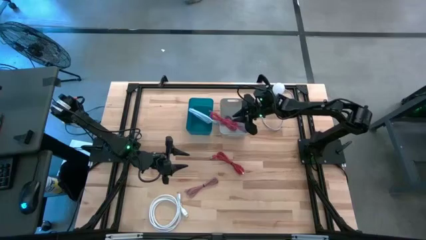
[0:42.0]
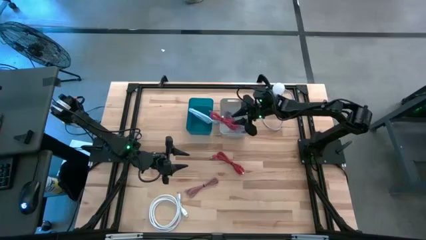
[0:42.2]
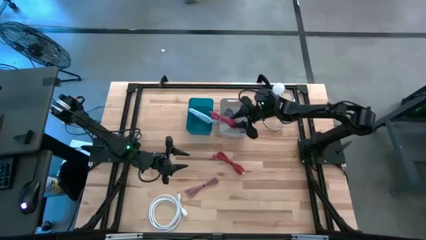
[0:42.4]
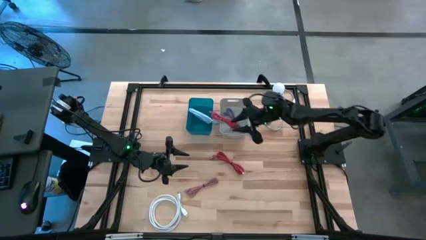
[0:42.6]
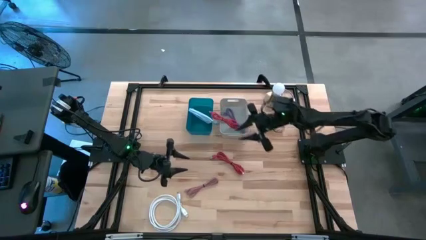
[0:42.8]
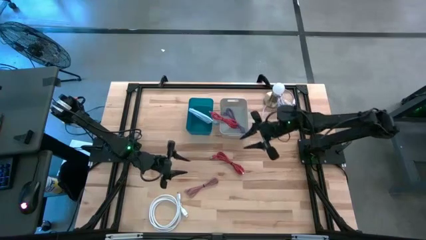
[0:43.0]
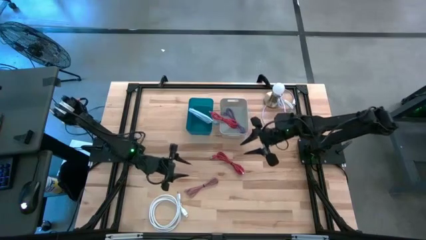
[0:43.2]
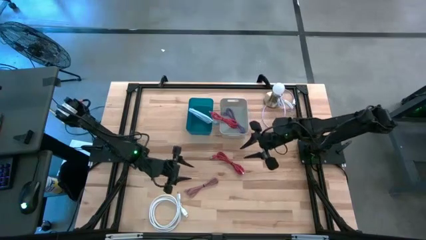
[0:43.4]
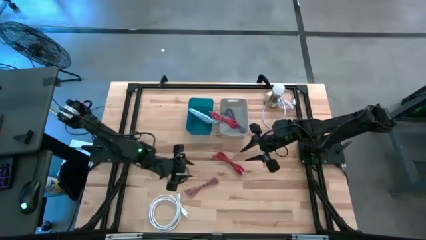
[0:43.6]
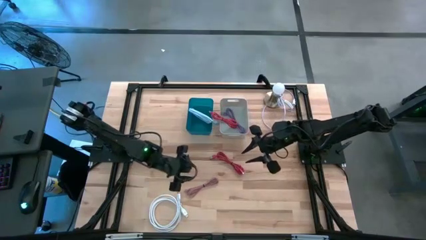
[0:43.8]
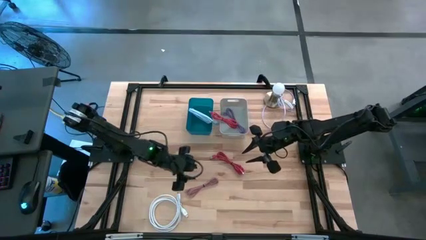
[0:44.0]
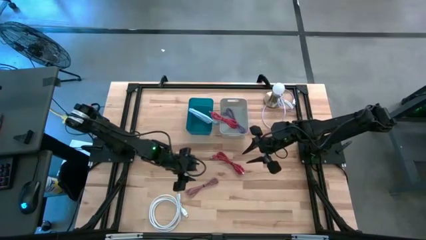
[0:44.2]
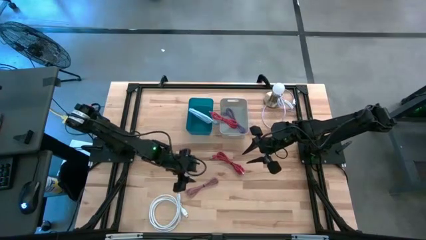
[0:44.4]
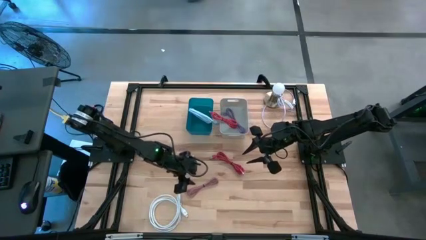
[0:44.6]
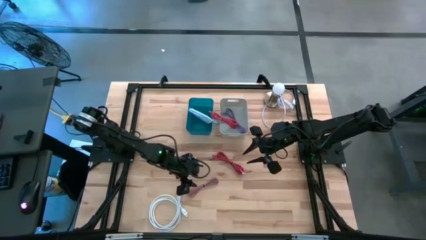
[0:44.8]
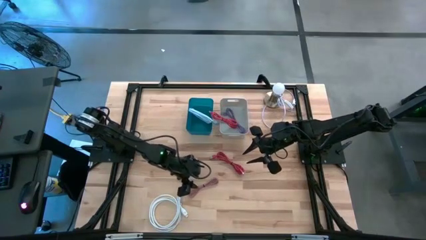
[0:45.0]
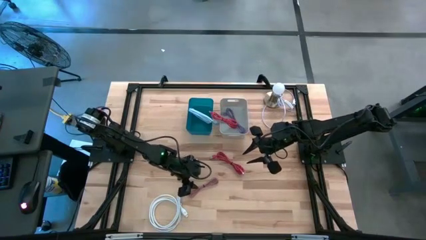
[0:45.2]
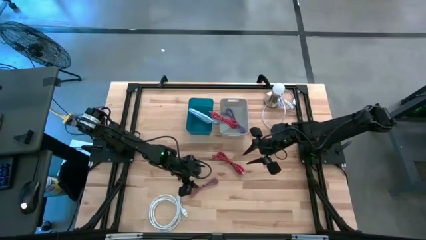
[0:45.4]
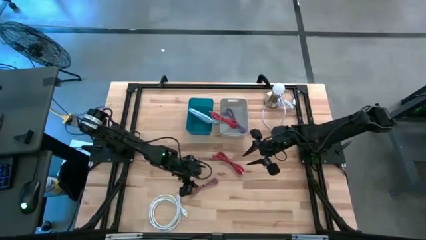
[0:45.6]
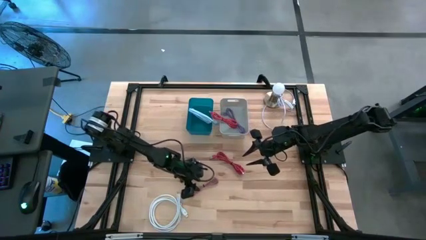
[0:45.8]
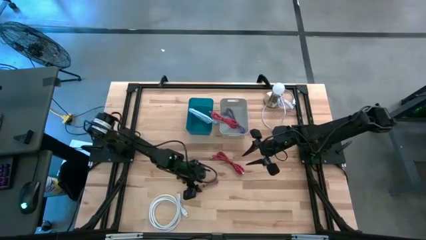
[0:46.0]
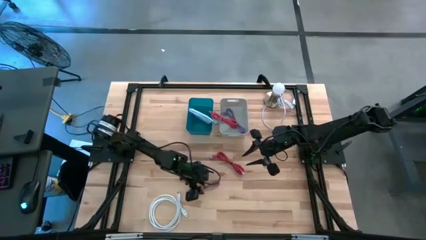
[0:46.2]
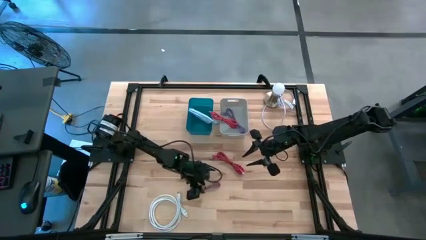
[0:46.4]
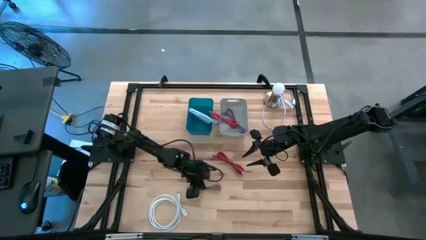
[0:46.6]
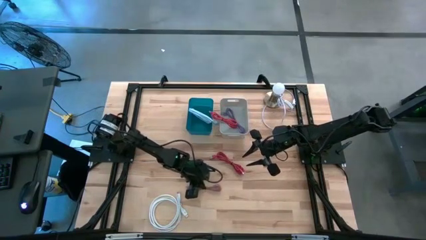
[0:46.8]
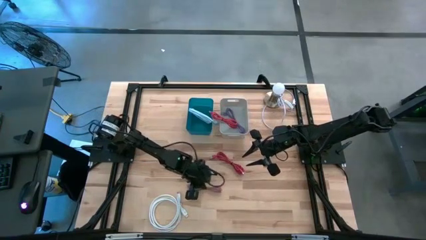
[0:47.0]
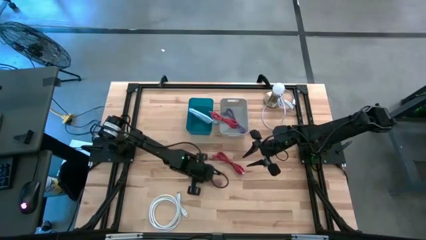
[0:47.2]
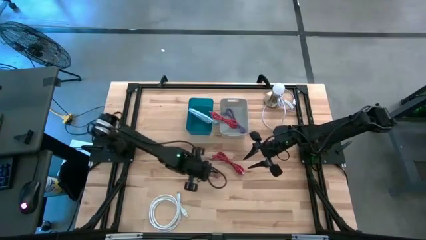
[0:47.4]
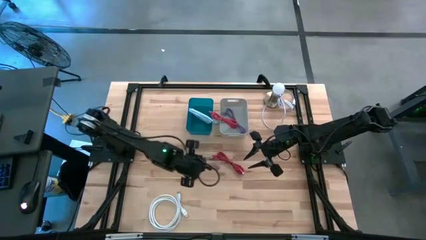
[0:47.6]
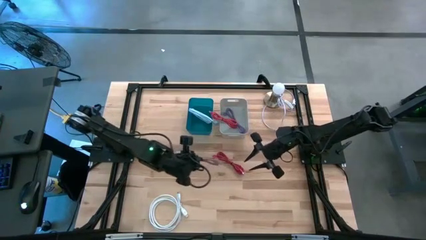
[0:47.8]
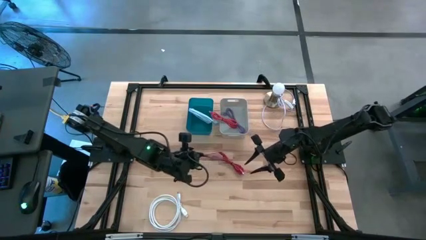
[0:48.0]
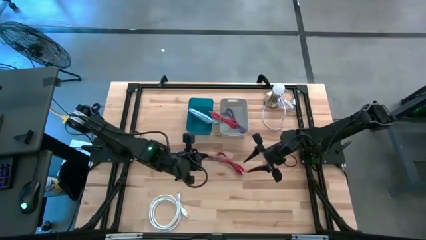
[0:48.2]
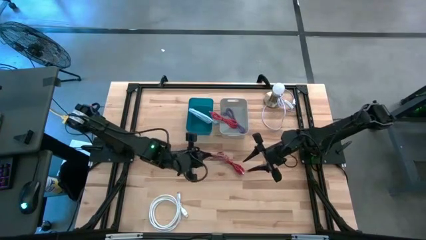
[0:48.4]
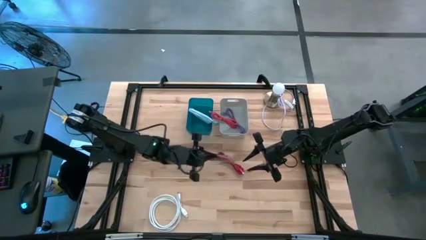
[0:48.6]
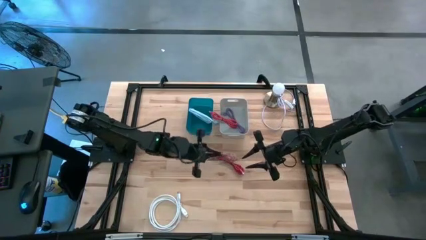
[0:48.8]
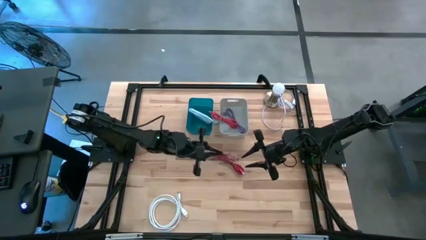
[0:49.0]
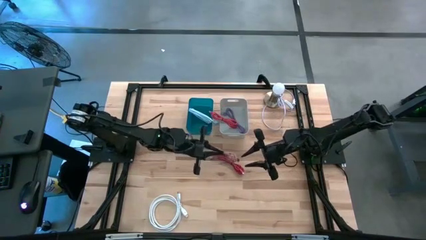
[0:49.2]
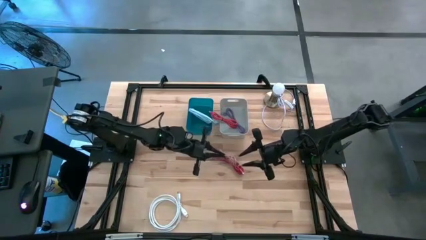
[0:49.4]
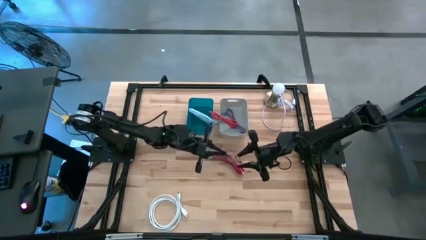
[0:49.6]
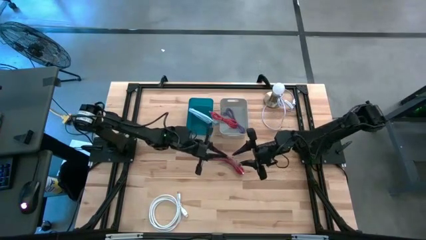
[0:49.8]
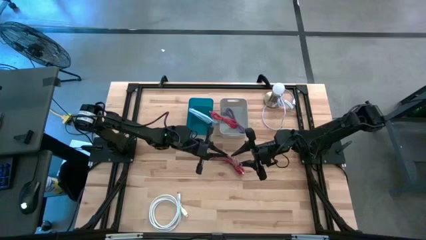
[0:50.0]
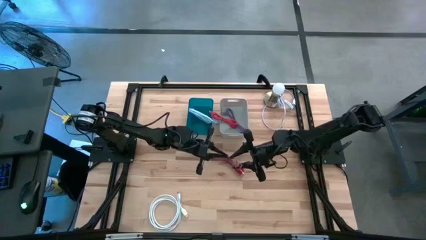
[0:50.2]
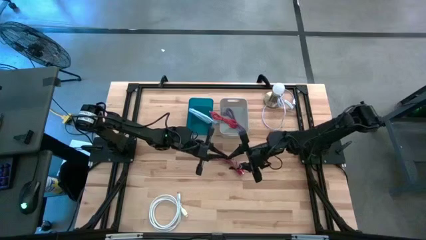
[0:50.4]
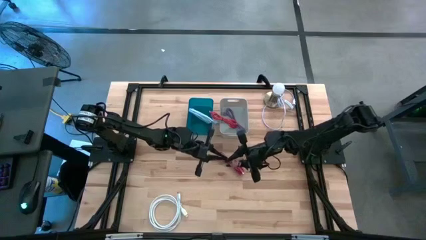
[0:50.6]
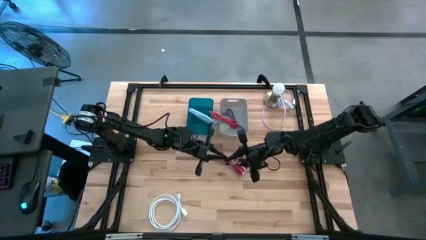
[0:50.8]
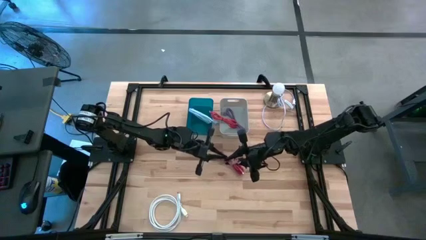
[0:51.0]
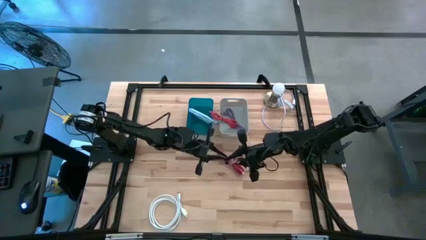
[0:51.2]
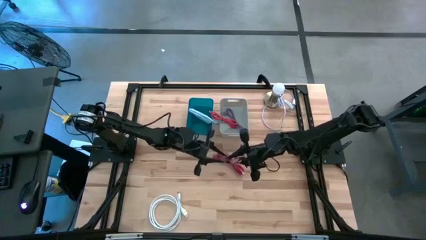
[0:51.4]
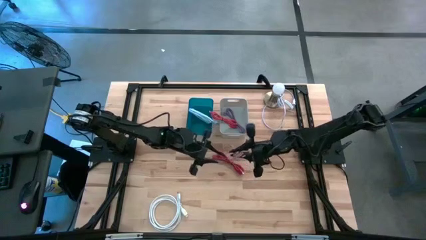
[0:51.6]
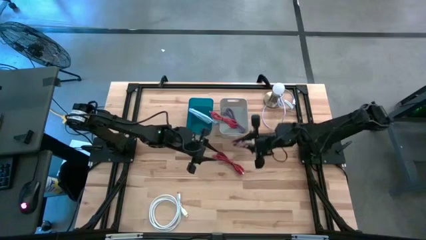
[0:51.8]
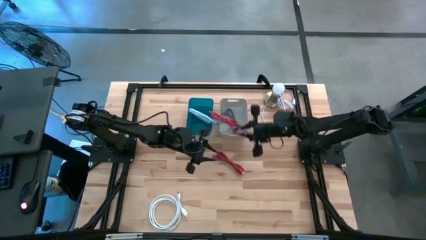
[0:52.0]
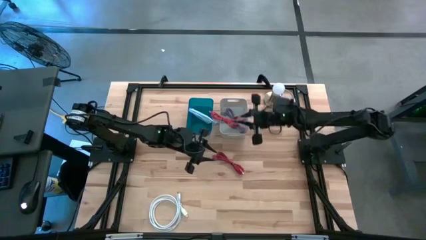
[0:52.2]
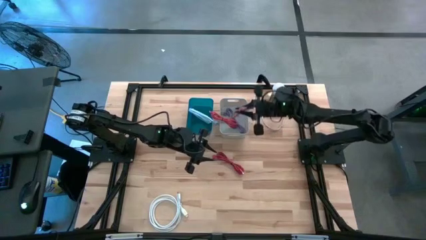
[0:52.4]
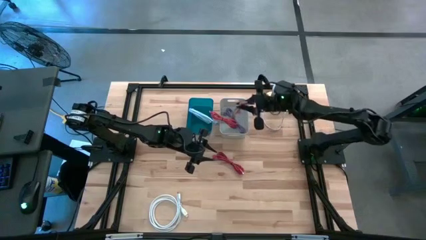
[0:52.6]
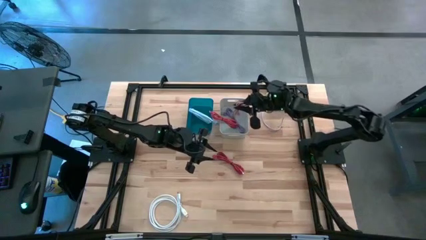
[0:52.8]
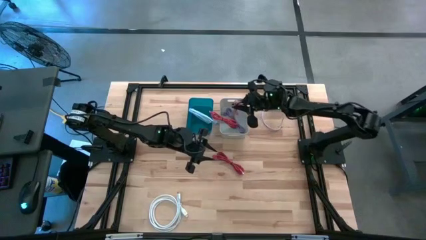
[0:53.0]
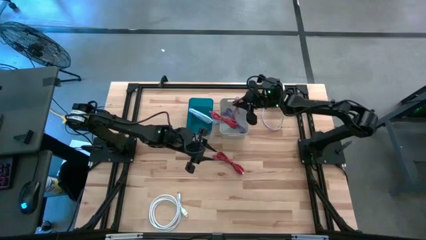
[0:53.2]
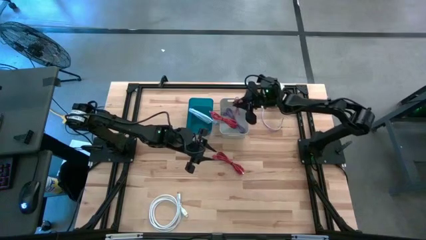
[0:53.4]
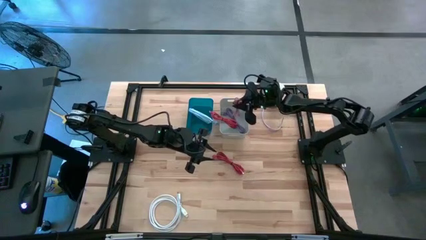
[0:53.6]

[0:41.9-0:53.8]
Task: Pick & Place USB Port
Put the pink charger cable into the gray bin
